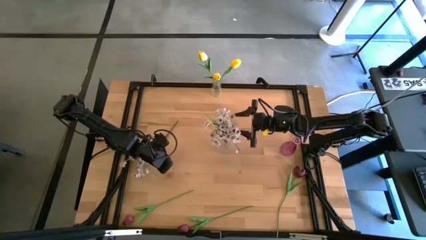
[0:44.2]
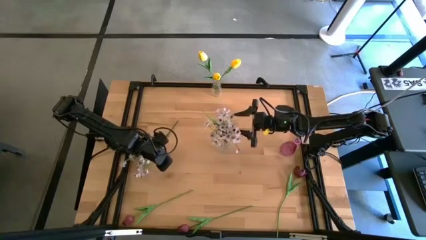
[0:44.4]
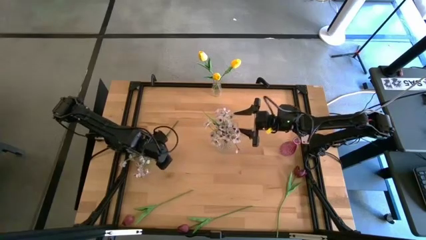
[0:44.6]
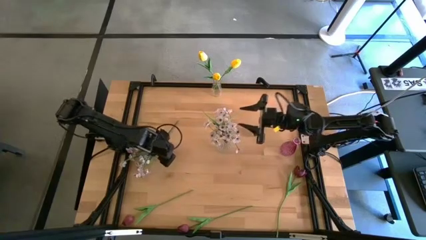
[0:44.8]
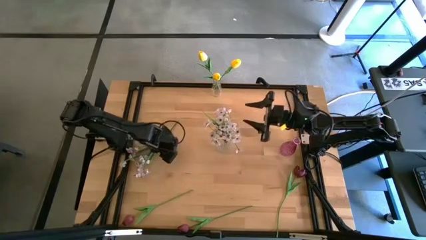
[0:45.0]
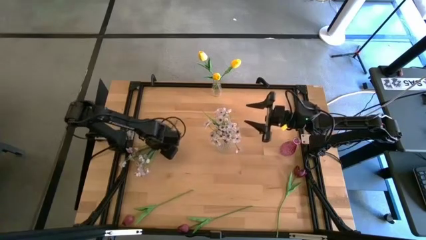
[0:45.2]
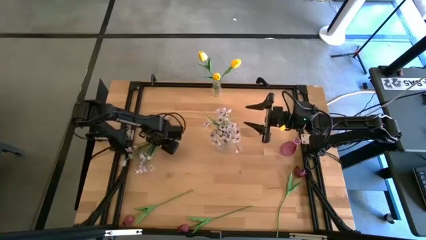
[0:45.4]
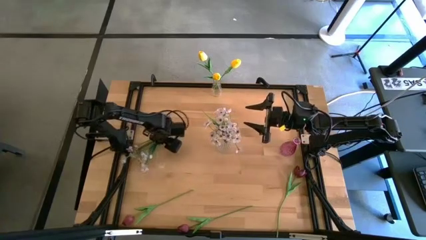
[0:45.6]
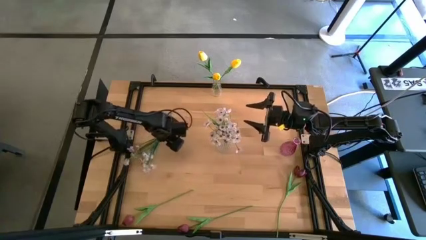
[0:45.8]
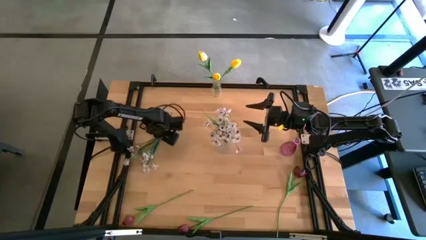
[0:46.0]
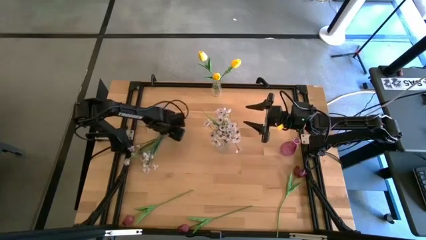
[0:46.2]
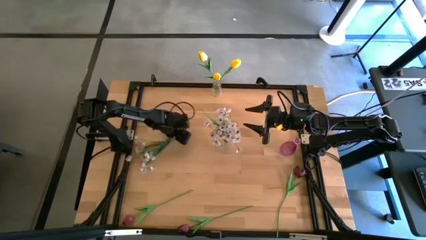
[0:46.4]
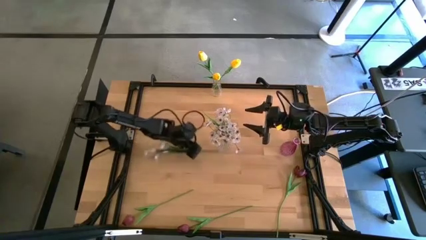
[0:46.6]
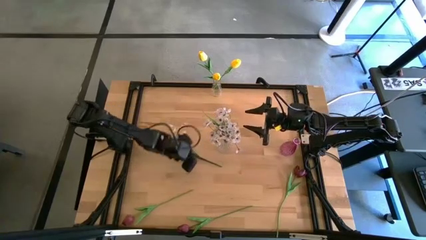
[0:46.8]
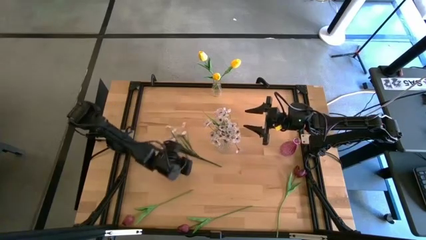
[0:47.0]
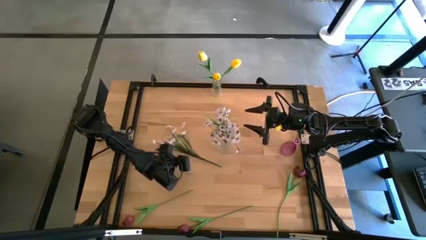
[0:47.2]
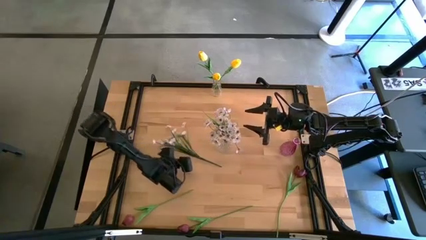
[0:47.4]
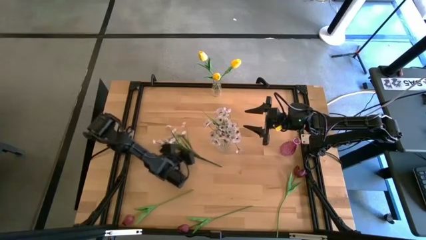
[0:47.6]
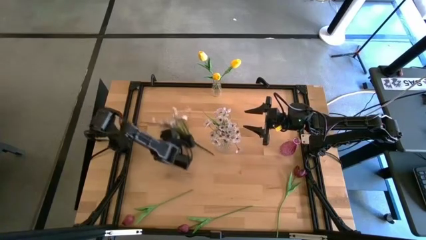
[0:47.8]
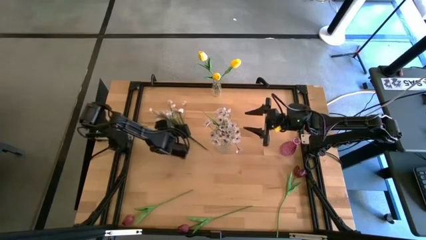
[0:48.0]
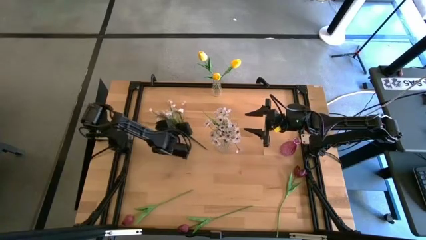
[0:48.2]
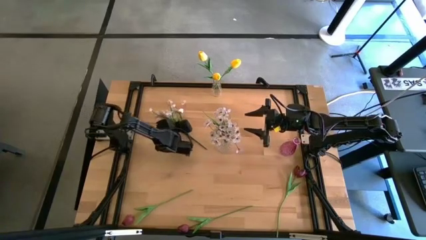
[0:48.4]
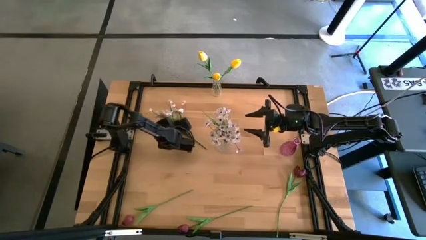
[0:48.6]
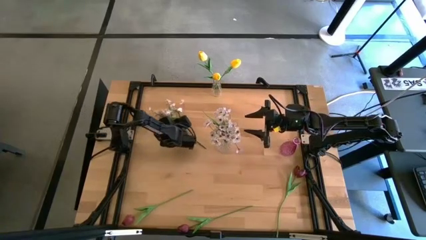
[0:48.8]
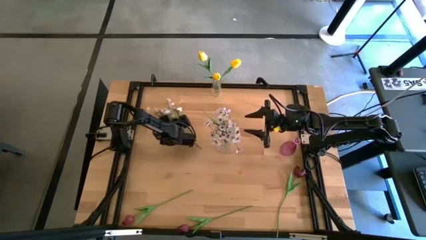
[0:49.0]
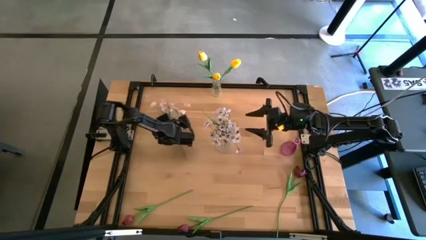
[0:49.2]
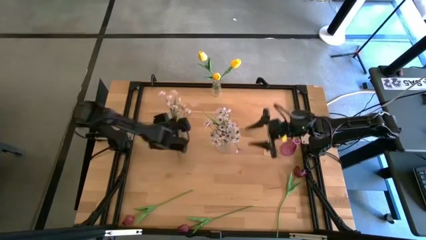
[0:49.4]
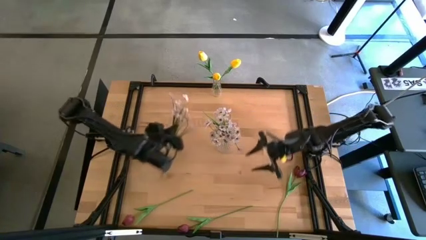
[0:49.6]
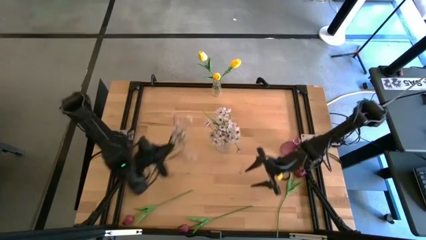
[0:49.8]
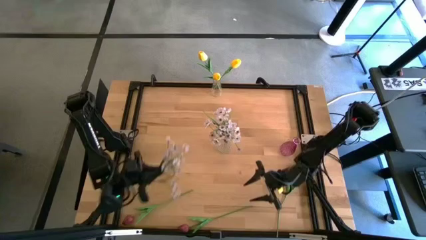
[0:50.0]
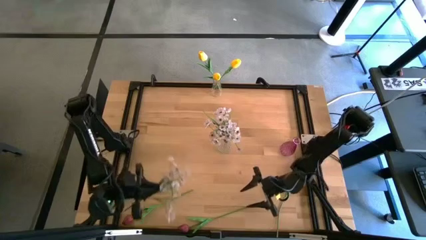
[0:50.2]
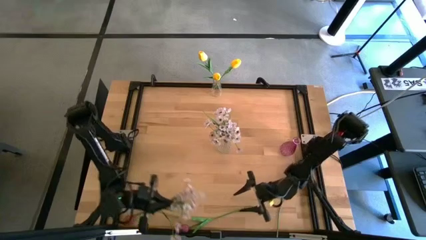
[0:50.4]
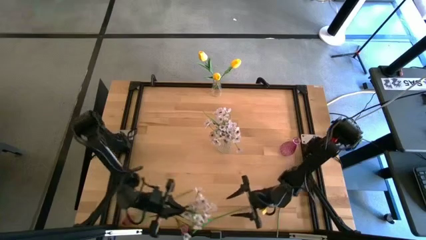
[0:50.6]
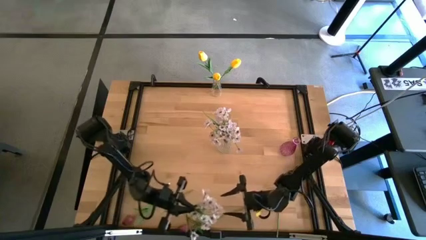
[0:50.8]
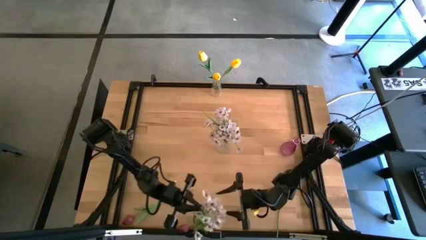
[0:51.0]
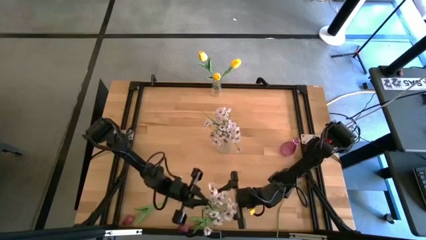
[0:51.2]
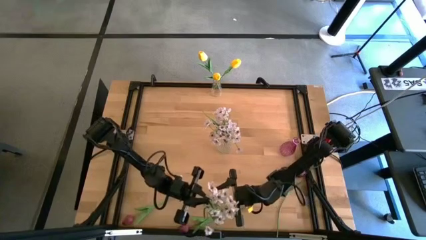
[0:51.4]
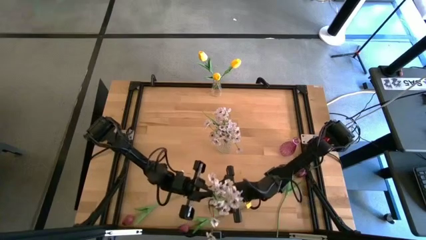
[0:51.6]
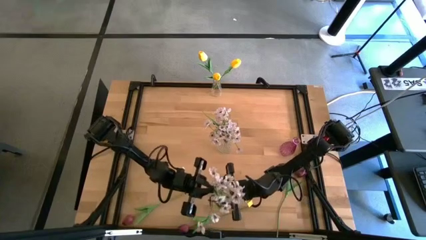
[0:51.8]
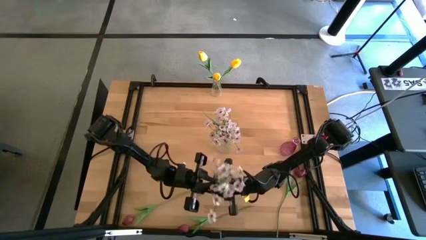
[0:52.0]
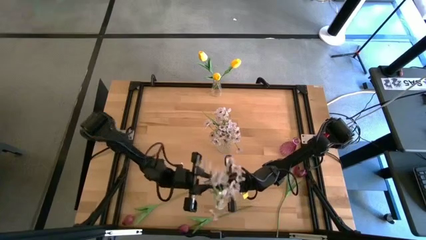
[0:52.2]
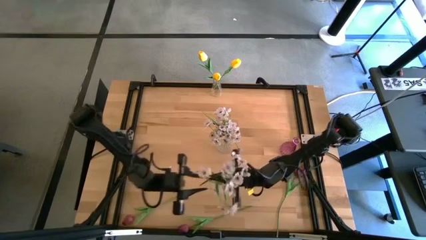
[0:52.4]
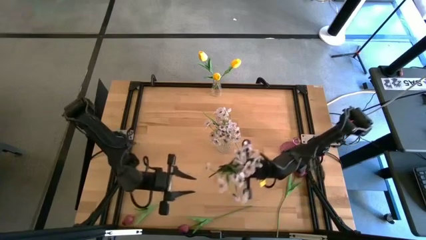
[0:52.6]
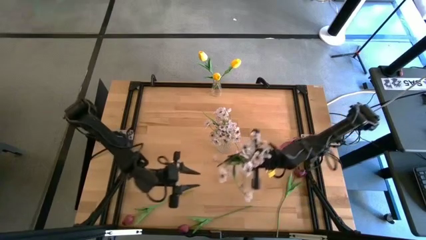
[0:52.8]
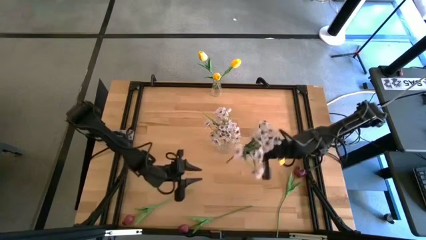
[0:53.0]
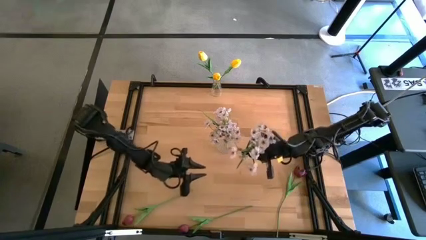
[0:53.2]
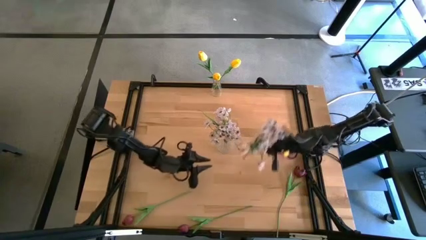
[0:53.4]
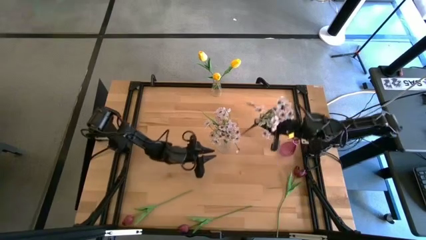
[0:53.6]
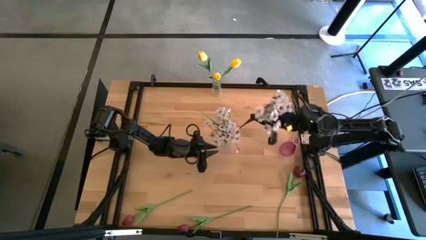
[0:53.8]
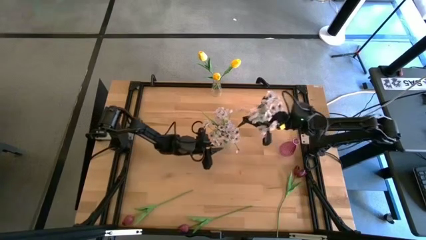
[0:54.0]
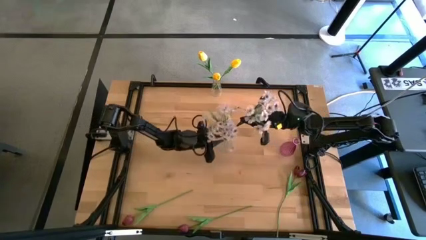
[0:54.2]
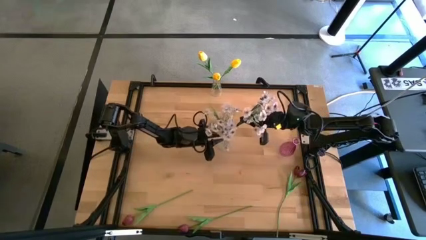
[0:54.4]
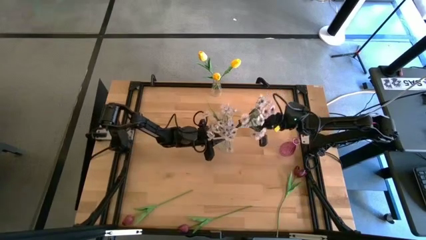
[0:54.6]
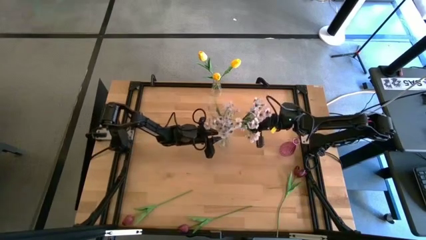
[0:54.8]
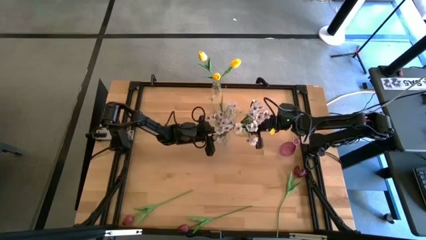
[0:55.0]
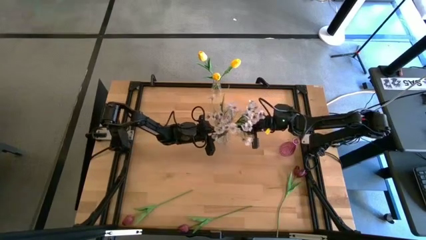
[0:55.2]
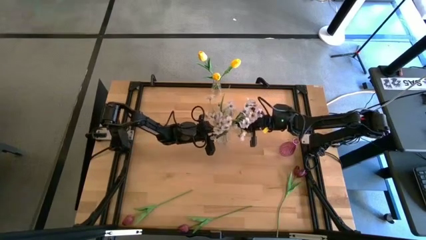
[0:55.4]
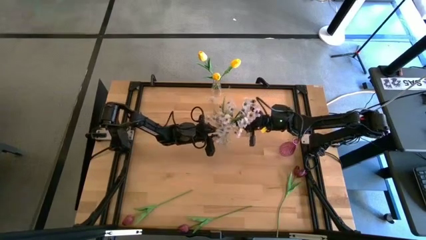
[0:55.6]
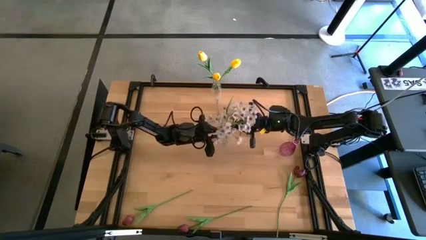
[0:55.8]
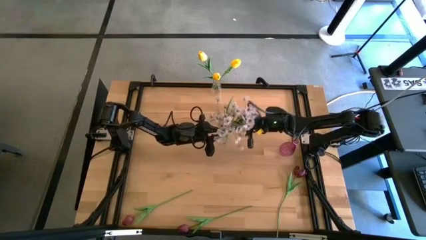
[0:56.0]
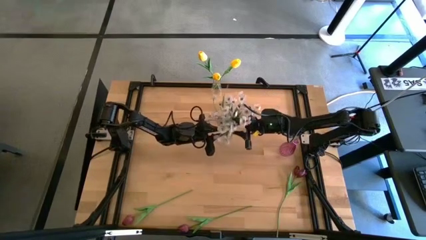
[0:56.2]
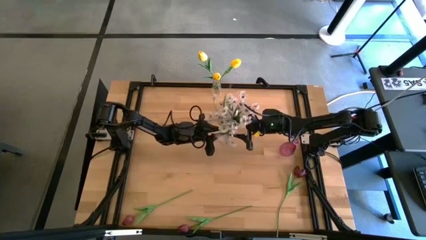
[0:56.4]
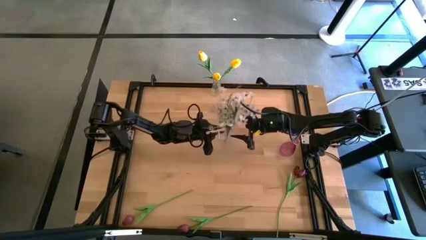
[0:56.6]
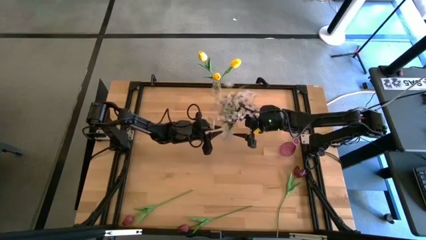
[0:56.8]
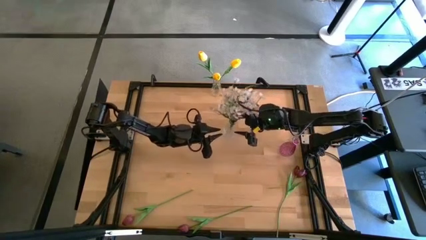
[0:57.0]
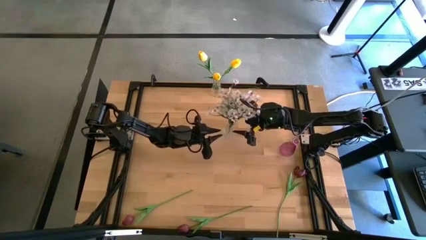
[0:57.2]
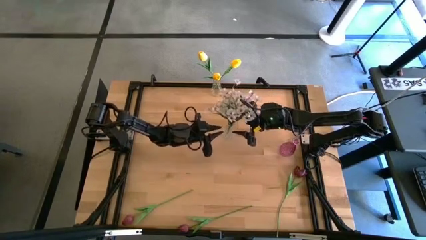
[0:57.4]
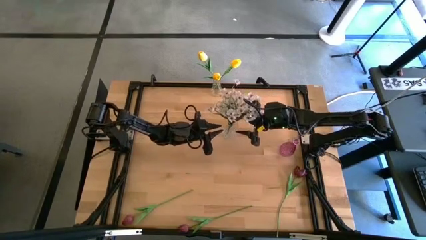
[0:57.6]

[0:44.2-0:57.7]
Task: Sort flowers into vase by color
Put the white flower into the bottom vase

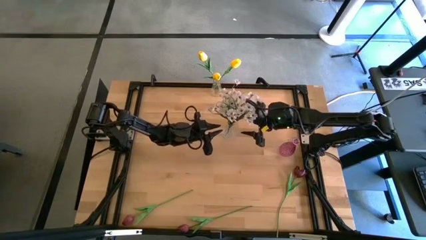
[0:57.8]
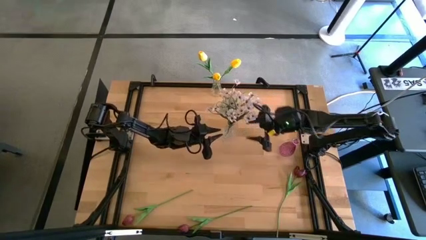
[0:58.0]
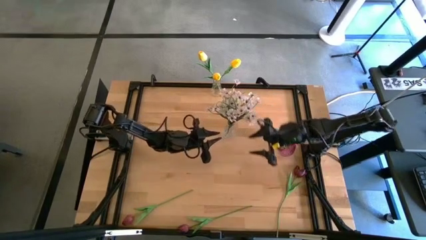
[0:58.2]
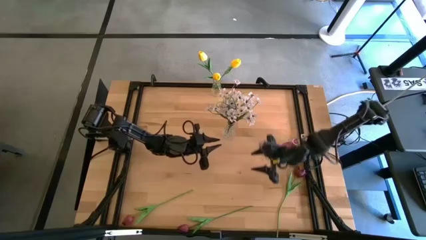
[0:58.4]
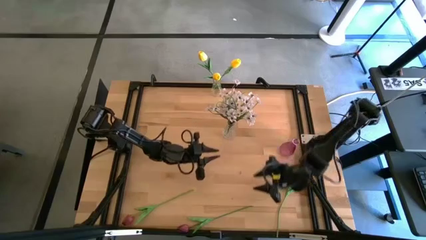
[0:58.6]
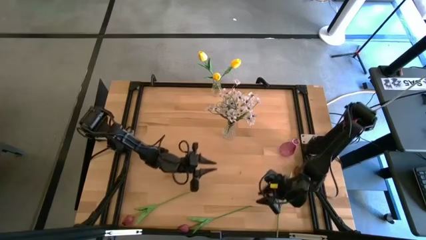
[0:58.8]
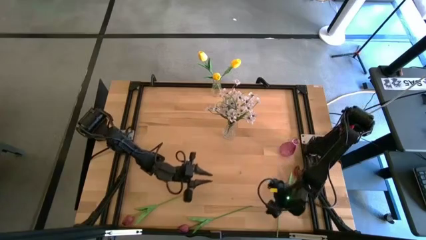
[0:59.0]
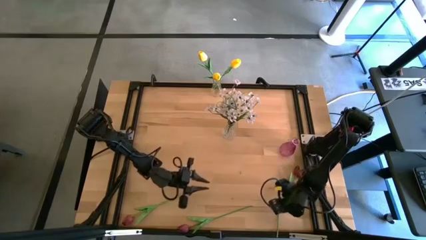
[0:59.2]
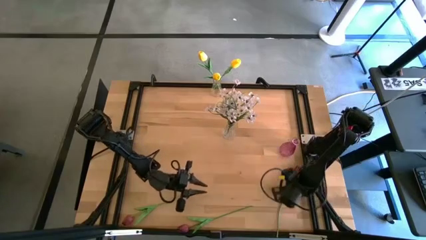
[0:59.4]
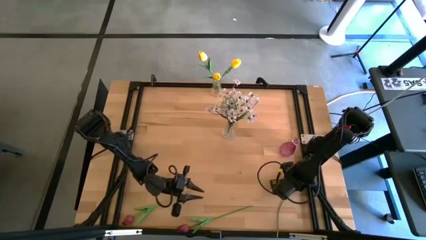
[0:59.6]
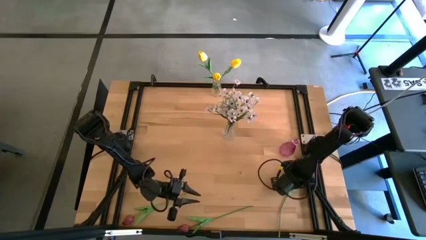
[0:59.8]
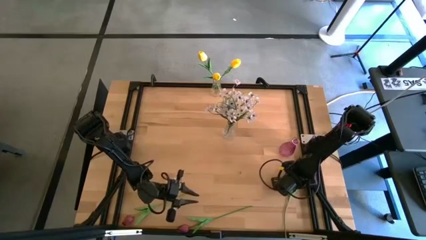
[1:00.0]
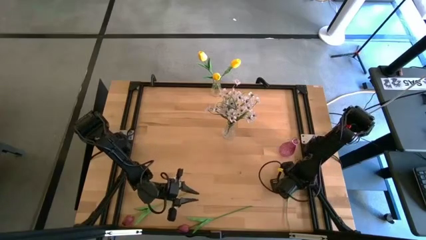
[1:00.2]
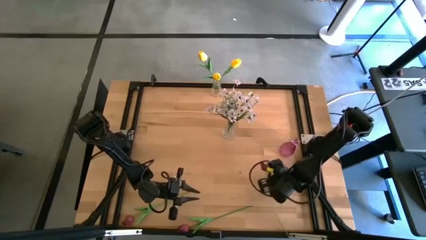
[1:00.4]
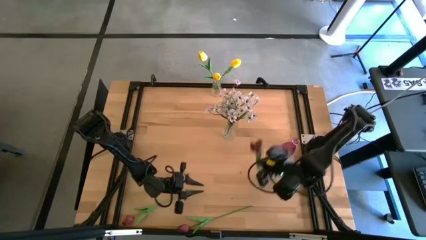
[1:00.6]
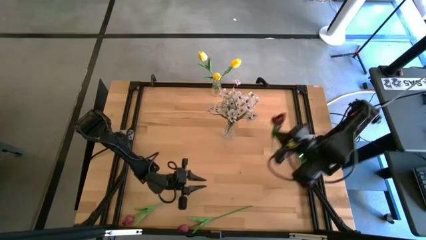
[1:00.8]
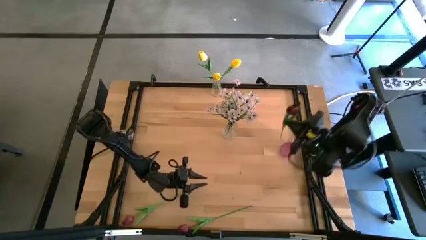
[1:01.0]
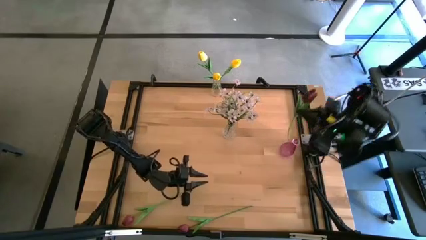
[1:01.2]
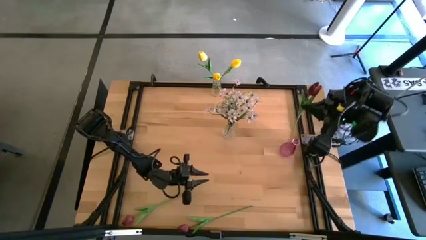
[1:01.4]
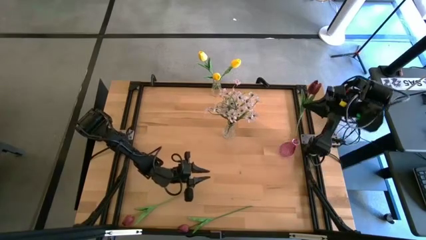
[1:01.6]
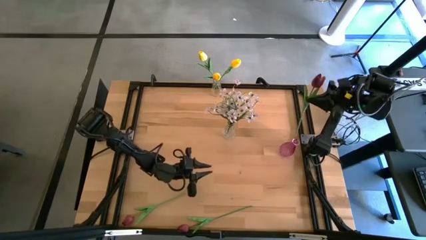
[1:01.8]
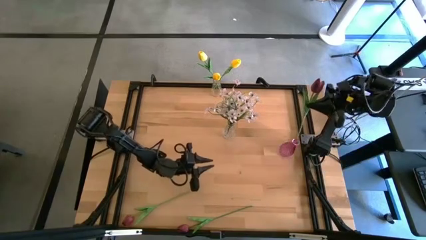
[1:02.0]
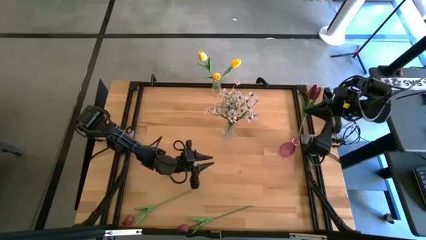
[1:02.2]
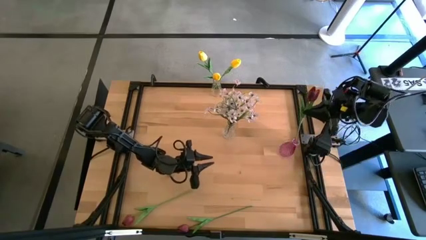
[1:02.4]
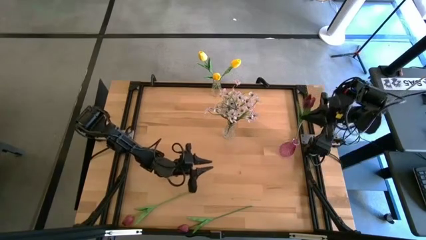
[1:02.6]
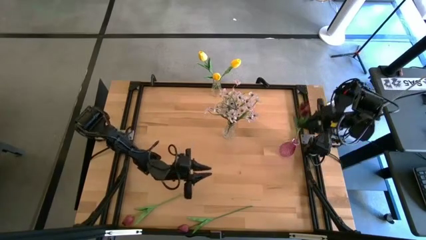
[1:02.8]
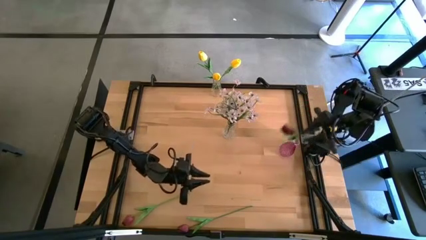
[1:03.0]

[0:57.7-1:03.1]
Put the right red flower into the pink vase
